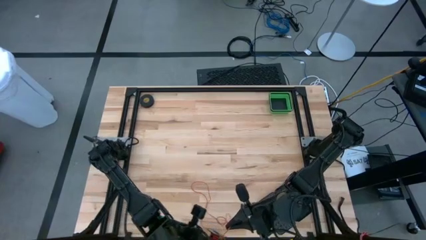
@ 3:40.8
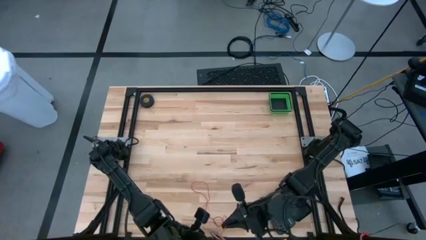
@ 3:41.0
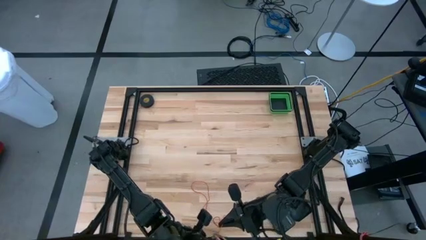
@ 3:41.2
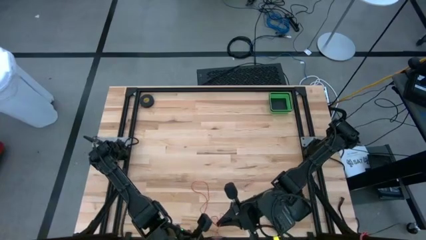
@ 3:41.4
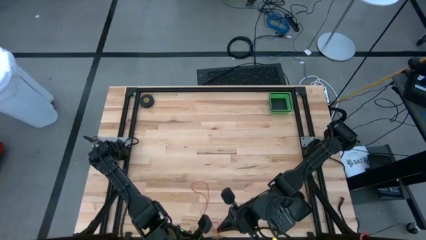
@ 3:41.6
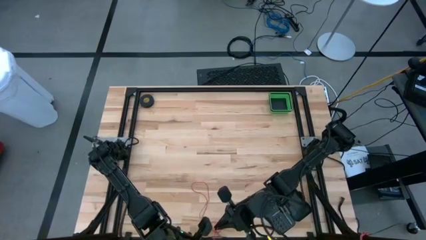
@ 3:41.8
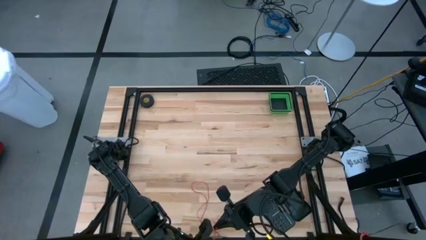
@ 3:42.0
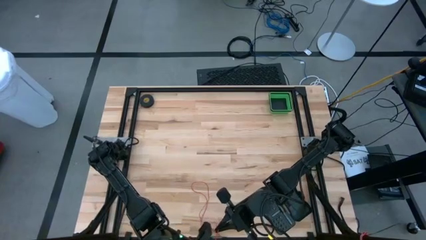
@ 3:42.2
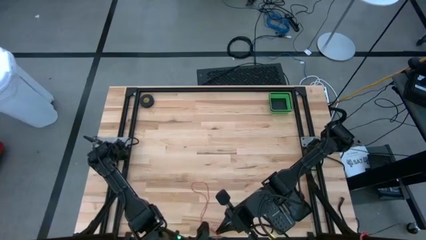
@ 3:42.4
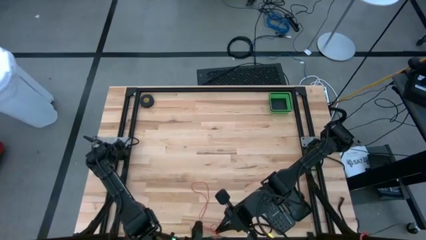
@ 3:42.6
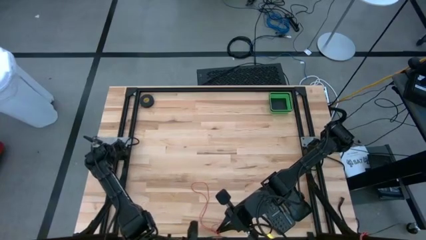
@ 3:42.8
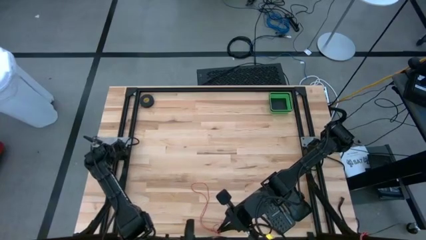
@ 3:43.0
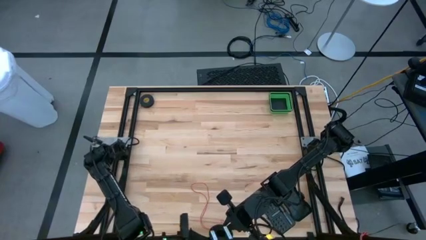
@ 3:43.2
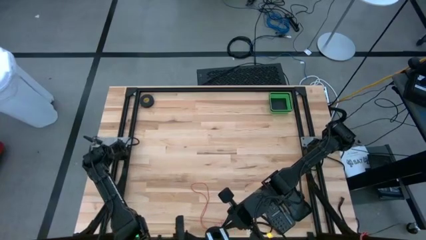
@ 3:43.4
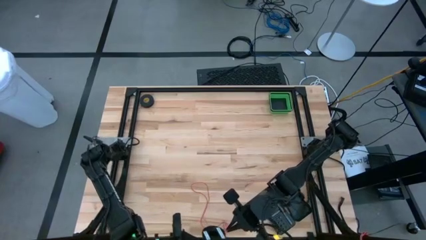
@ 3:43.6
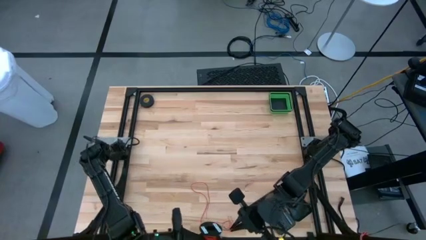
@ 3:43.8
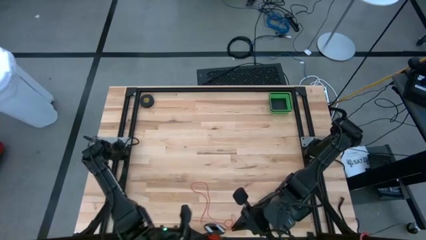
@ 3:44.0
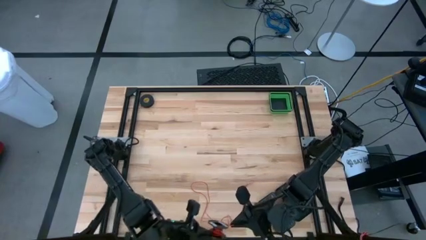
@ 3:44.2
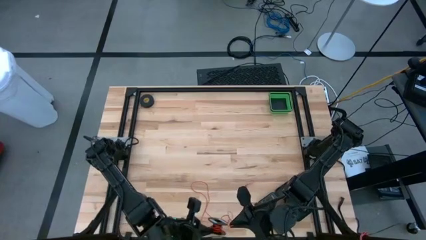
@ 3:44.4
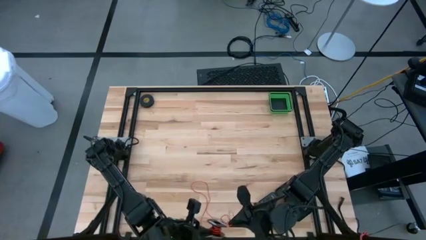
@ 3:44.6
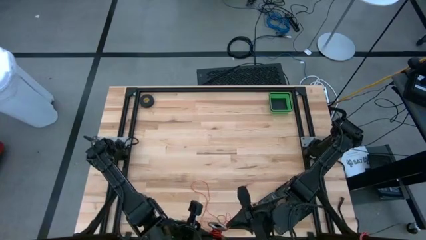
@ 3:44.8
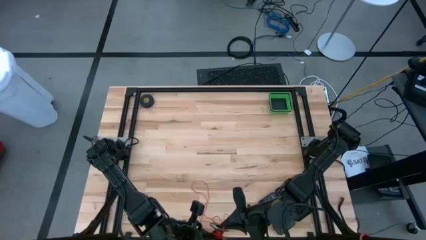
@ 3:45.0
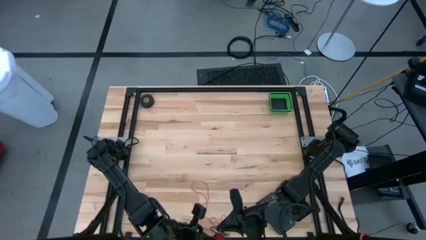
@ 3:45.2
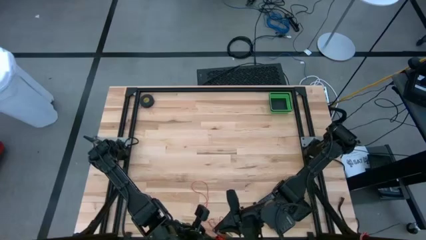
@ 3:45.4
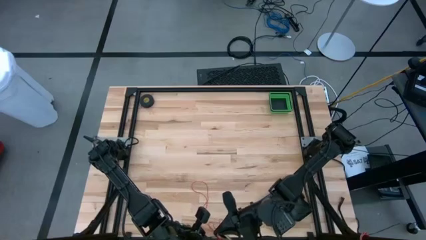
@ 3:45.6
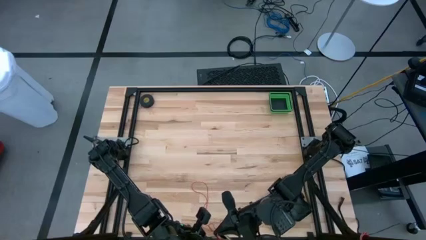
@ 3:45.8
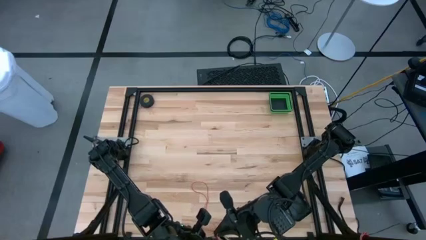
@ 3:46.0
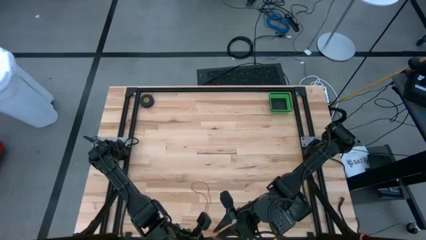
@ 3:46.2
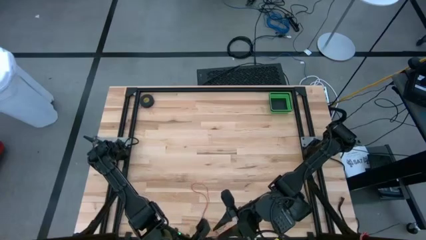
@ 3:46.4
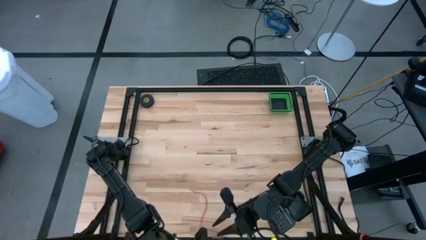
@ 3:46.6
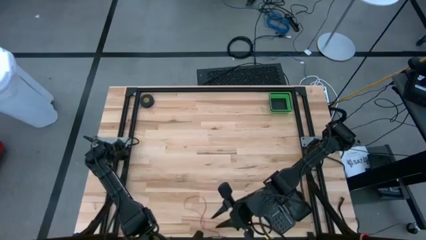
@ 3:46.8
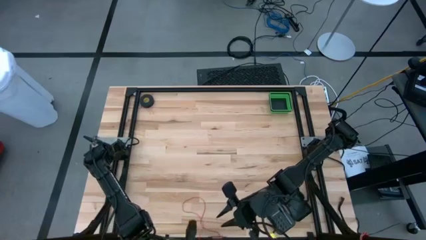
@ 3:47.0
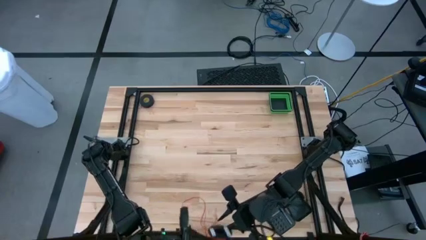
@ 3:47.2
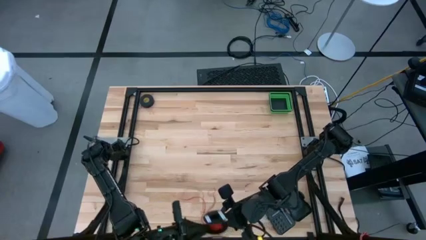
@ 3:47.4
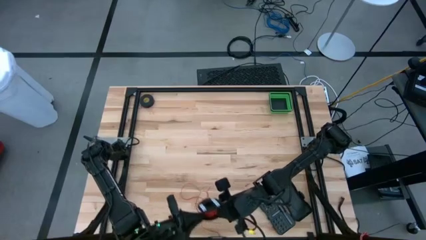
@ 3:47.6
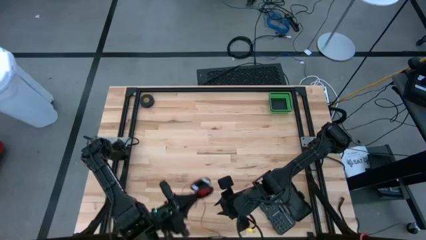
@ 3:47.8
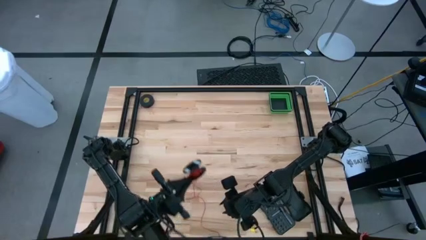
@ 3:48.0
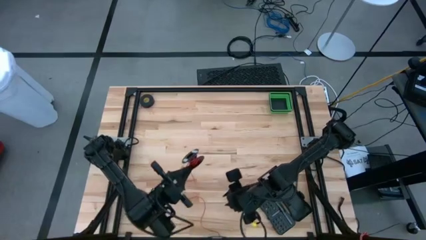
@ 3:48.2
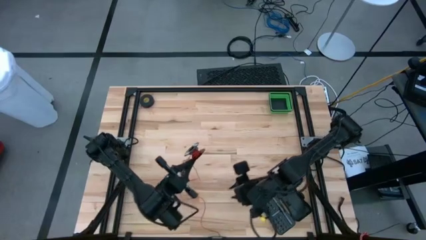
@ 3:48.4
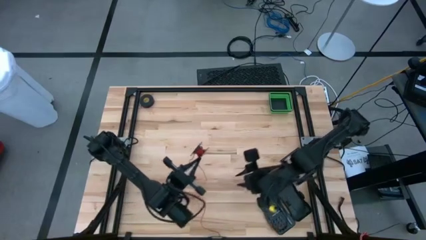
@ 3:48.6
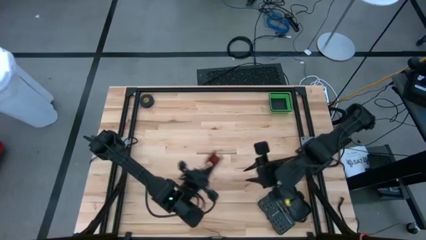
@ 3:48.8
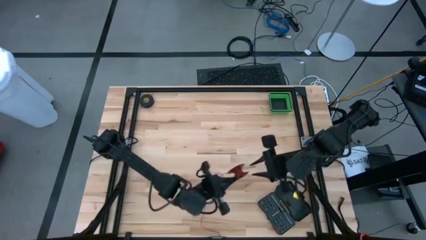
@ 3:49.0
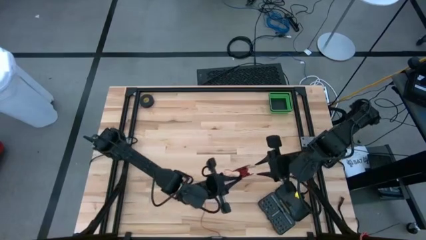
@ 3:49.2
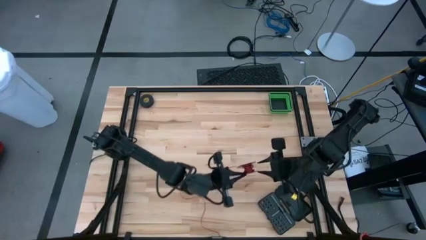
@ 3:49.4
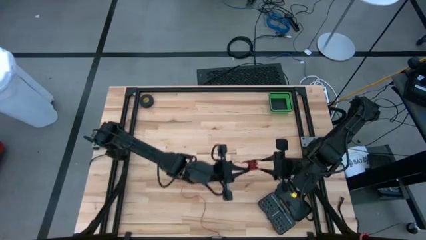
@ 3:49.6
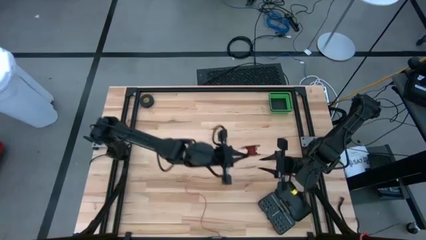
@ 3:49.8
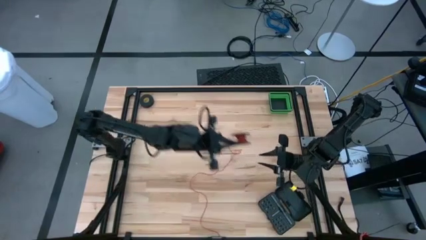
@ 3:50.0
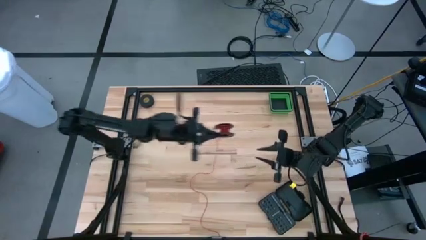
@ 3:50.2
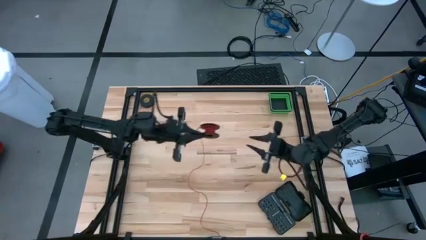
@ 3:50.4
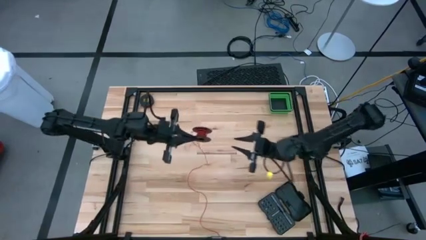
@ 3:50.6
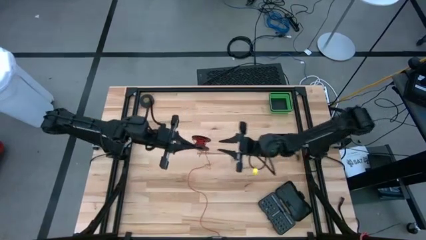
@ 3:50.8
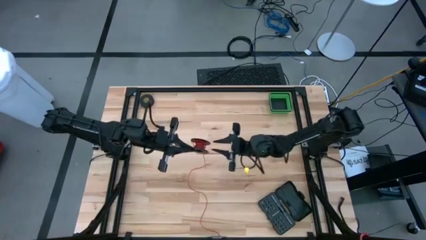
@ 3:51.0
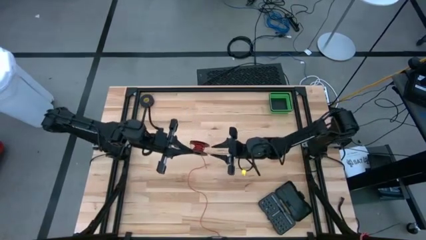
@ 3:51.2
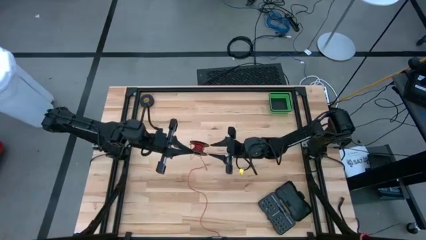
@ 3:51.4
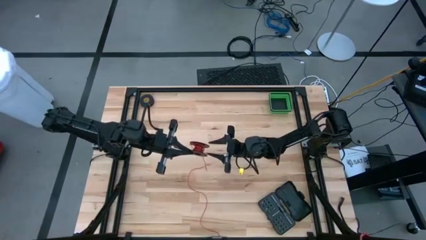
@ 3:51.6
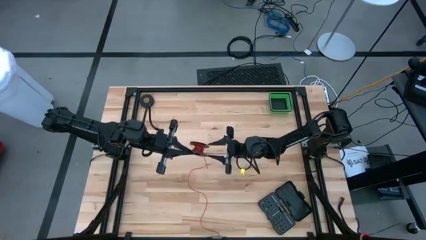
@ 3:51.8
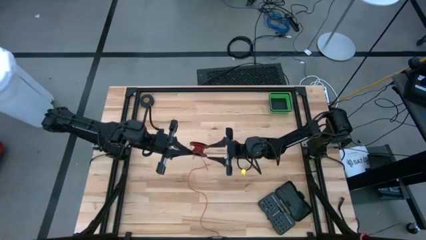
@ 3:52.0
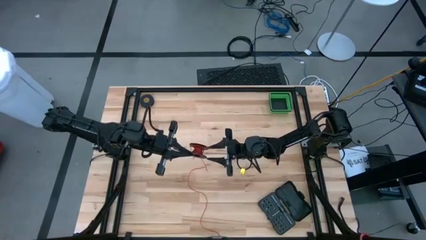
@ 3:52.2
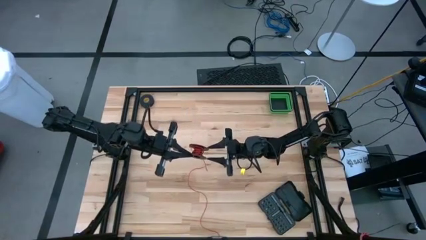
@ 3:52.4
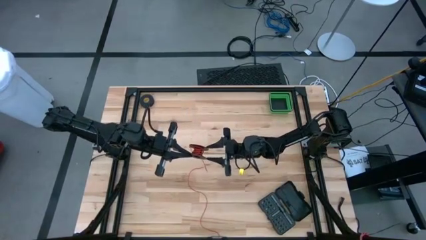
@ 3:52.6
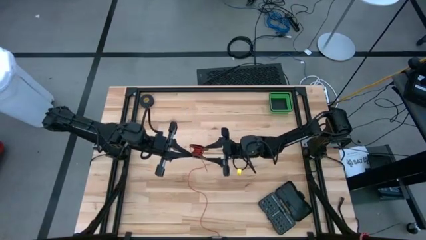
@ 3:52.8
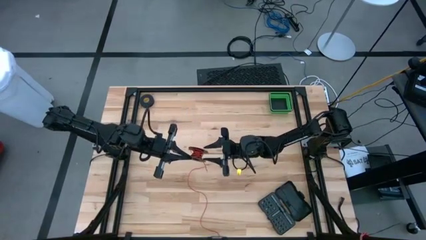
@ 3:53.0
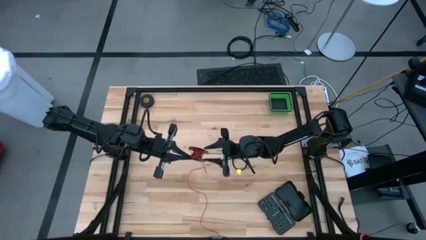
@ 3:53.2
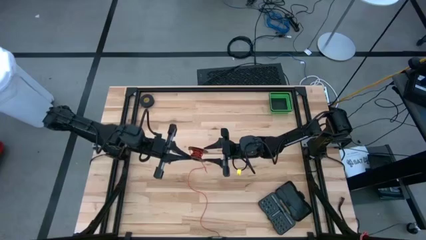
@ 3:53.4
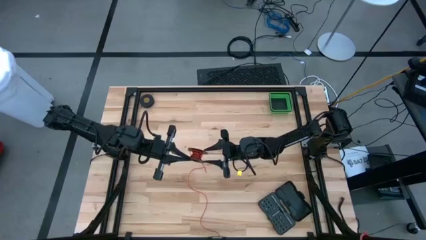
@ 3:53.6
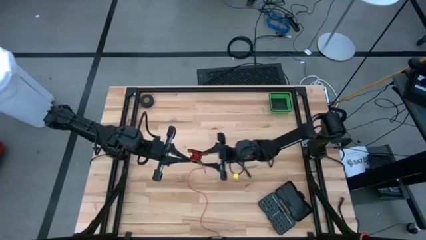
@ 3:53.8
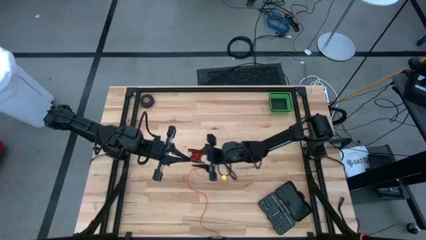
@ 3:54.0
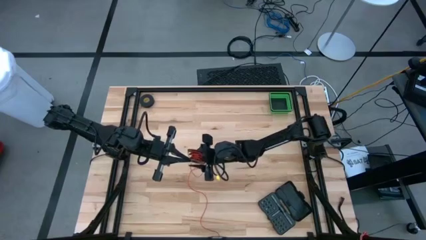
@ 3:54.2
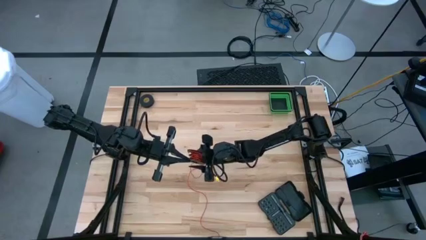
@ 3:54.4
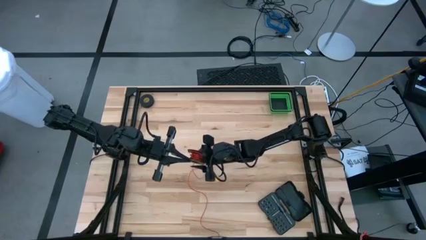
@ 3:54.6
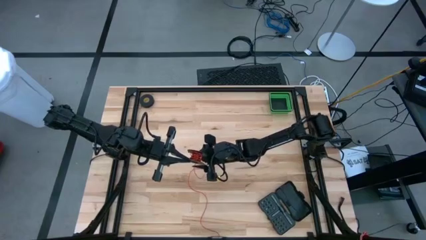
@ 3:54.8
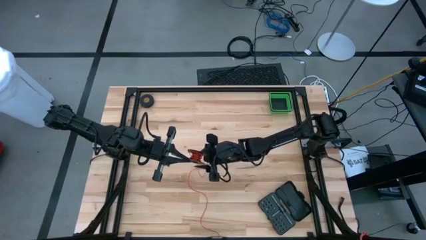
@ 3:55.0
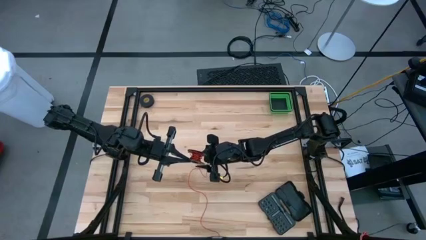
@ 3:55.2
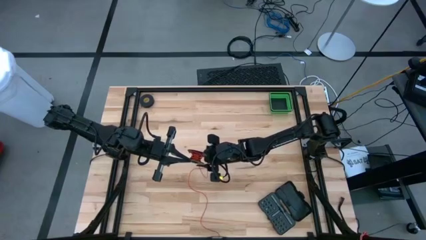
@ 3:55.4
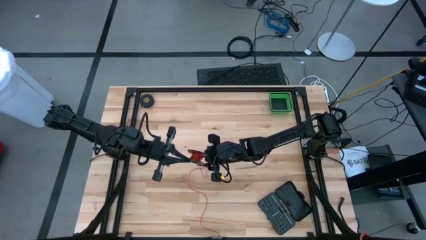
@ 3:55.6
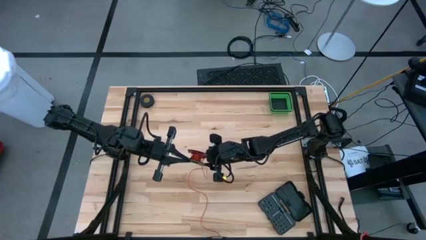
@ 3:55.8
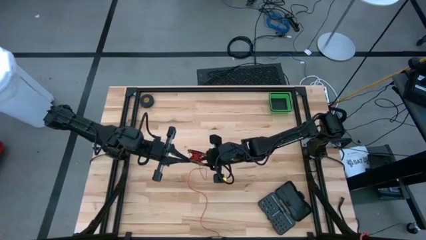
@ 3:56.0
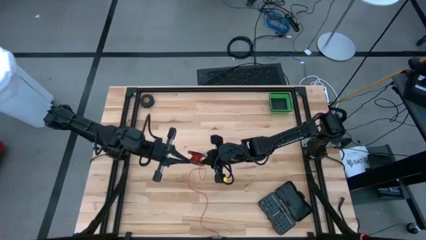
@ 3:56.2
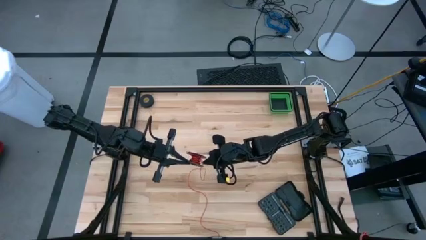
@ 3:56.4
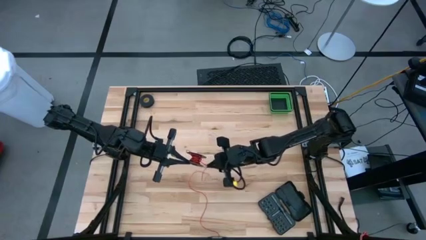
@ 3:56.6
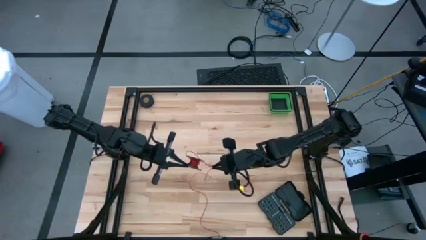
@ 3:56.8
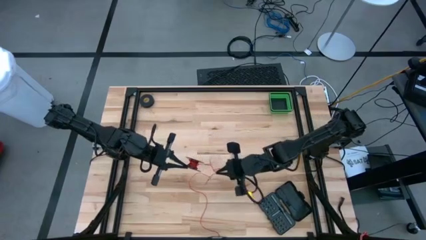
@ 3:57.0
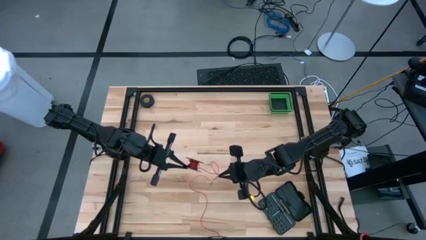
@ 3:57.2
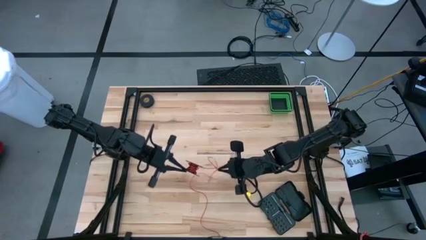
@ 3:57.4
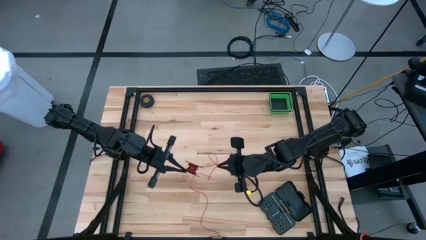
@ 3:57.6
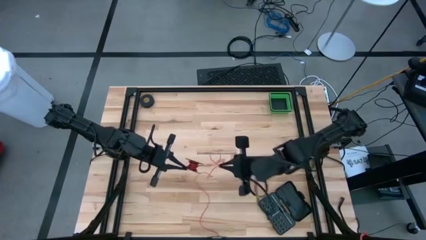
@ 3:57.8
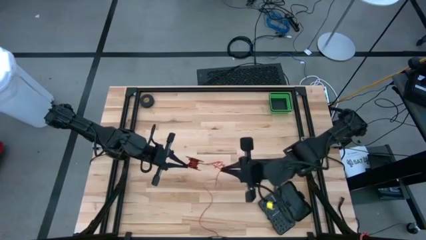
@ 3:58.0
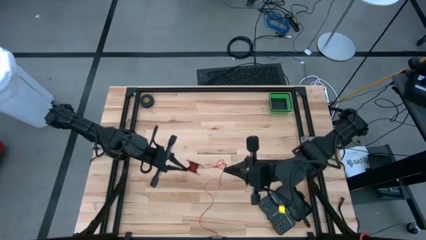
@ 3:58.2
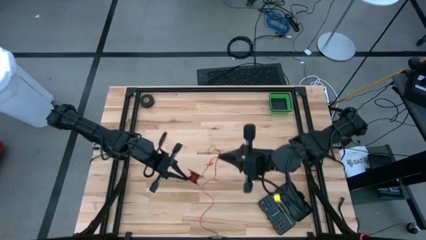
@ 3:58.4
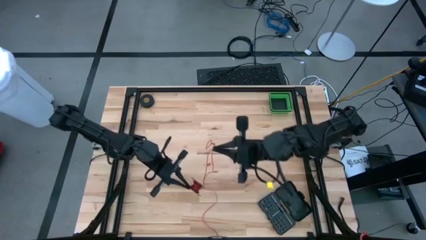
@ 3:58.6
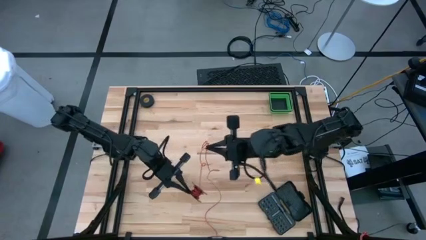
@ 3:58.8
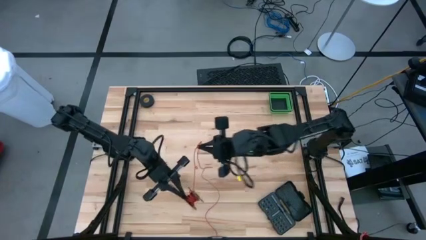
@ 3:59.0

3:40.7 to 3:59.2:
Task: Coil cords
Coil the red wire on the black spool
